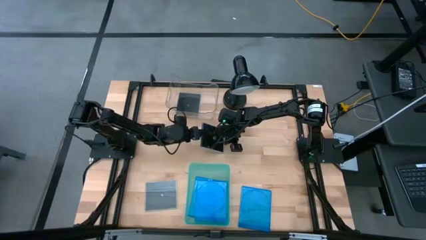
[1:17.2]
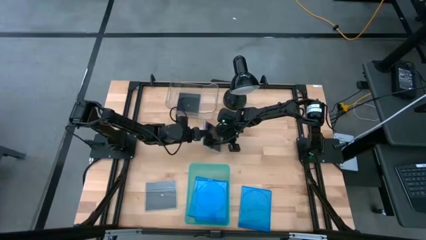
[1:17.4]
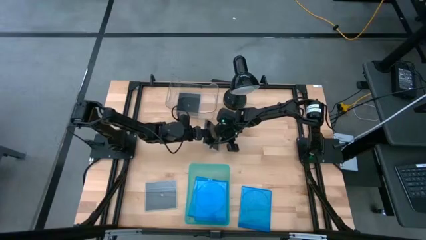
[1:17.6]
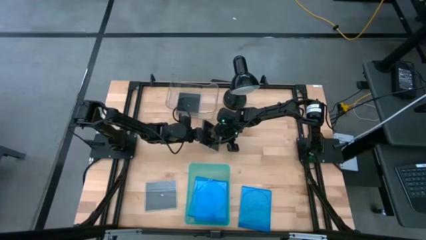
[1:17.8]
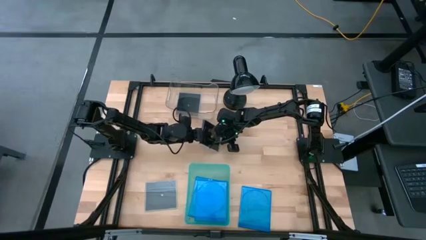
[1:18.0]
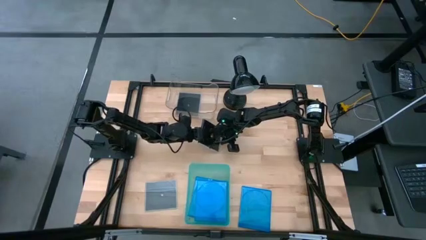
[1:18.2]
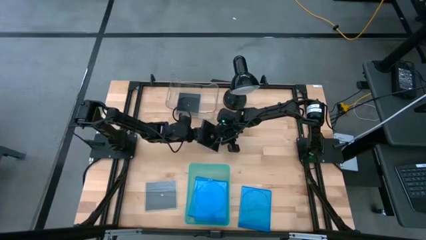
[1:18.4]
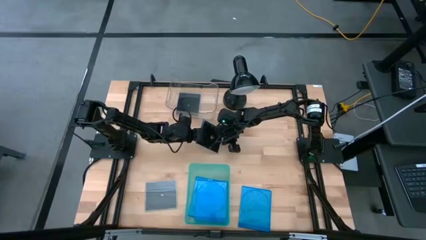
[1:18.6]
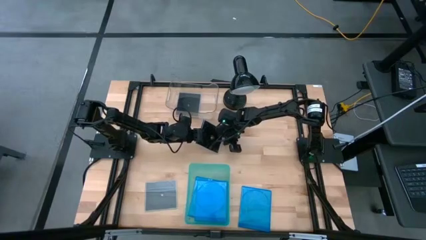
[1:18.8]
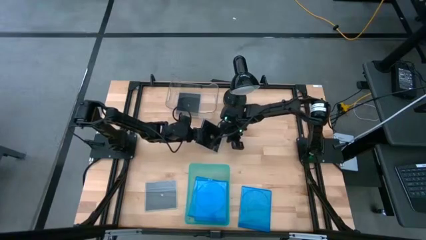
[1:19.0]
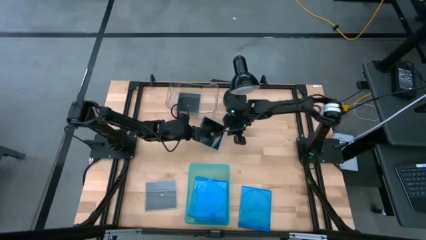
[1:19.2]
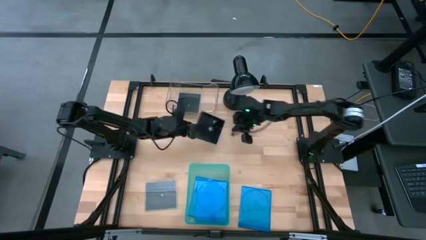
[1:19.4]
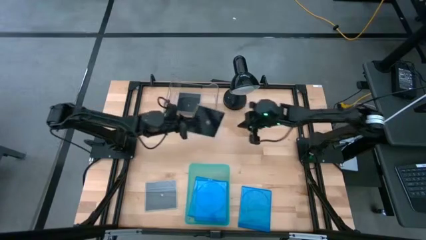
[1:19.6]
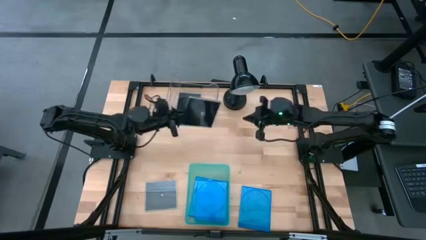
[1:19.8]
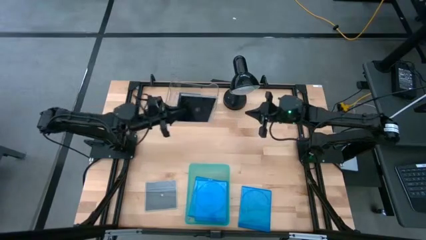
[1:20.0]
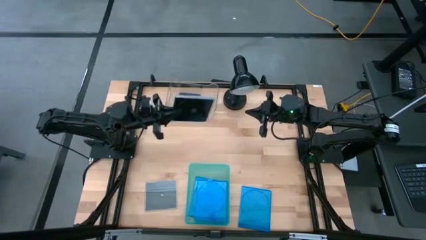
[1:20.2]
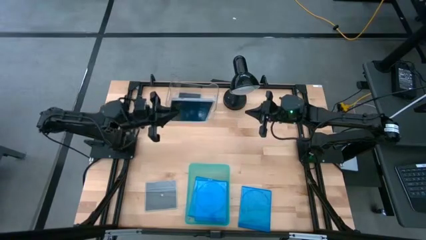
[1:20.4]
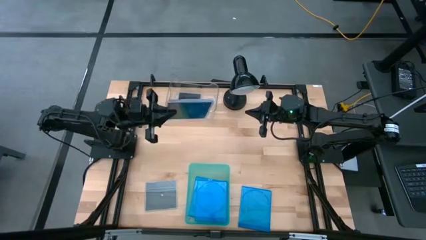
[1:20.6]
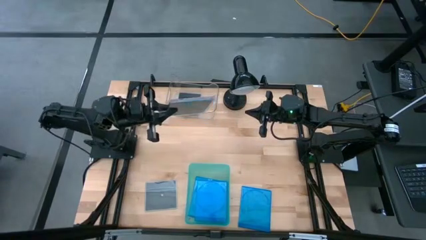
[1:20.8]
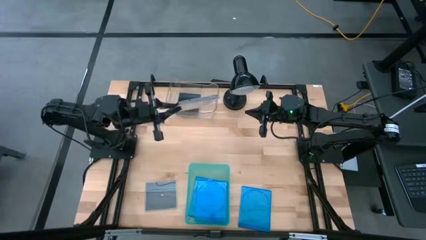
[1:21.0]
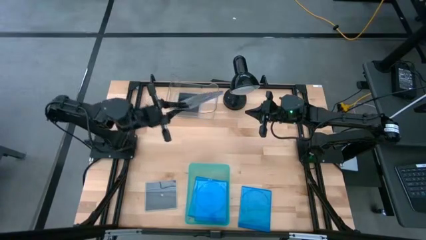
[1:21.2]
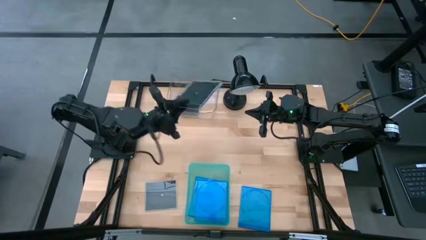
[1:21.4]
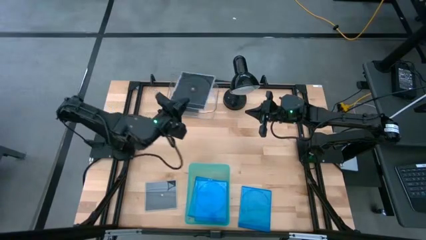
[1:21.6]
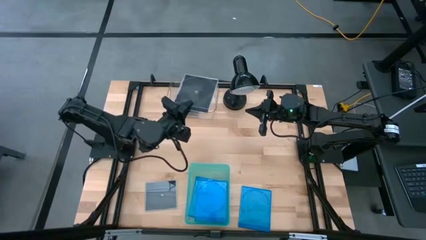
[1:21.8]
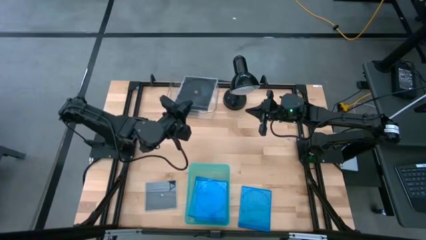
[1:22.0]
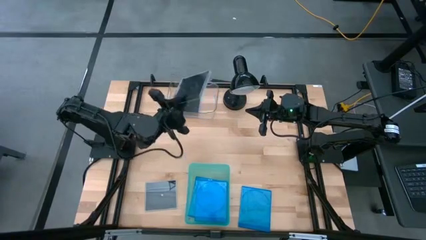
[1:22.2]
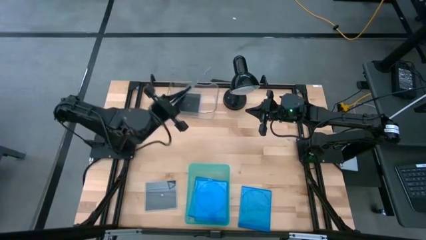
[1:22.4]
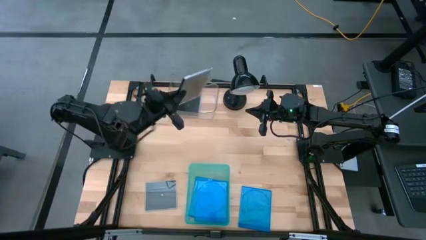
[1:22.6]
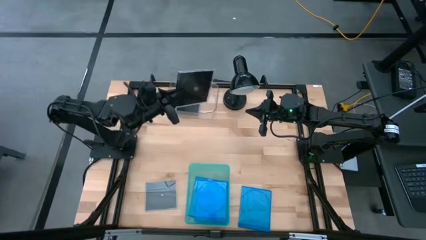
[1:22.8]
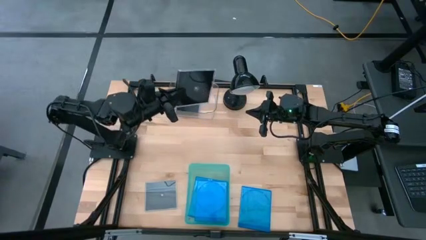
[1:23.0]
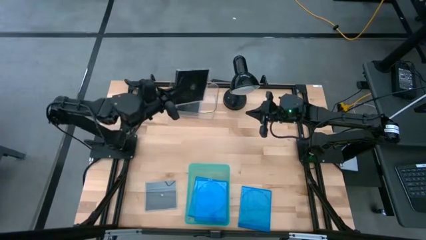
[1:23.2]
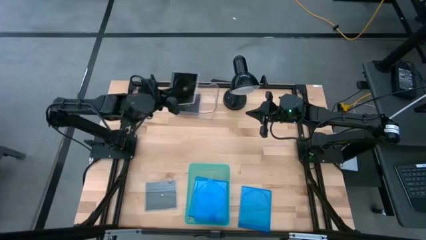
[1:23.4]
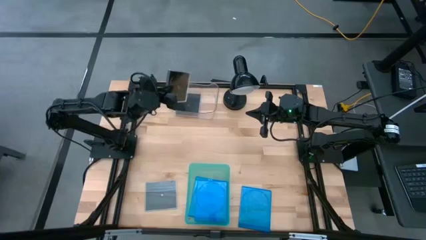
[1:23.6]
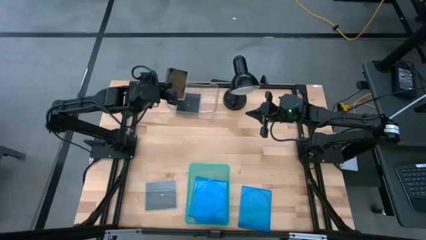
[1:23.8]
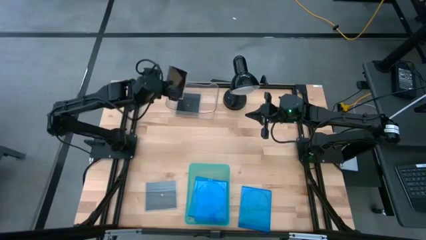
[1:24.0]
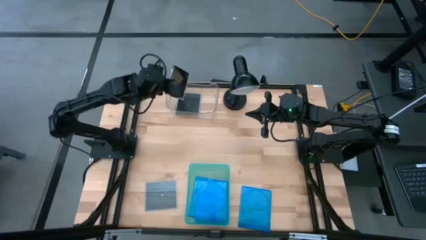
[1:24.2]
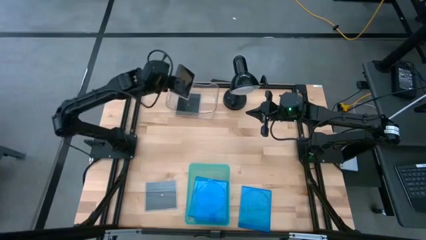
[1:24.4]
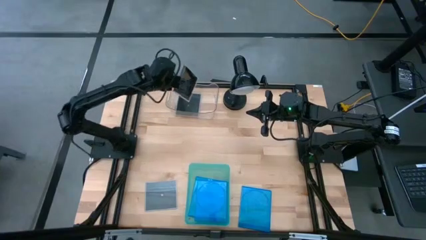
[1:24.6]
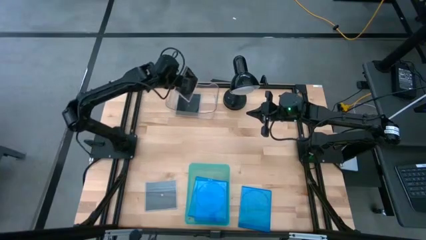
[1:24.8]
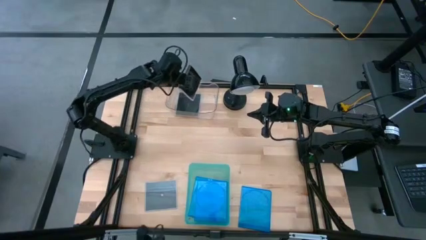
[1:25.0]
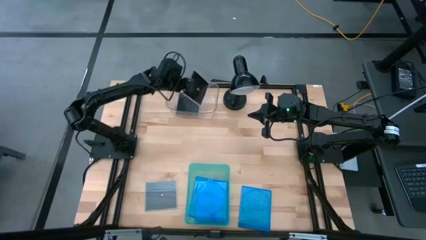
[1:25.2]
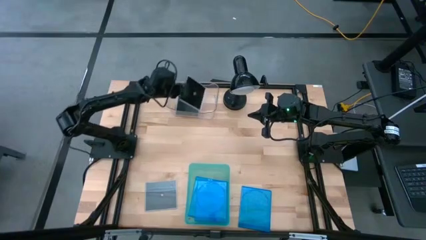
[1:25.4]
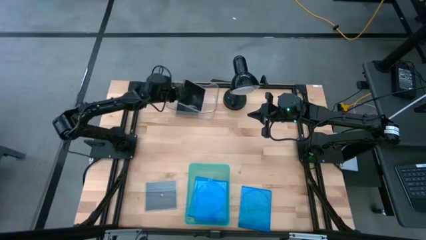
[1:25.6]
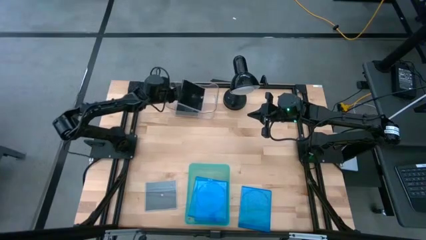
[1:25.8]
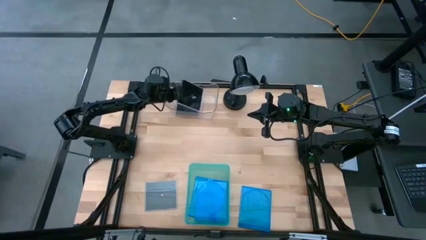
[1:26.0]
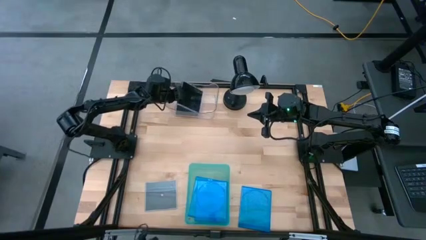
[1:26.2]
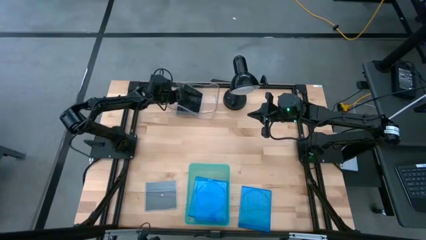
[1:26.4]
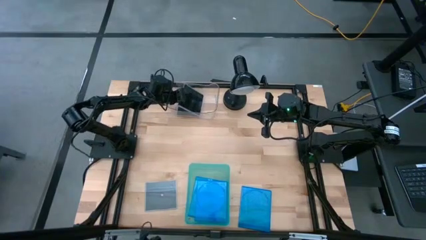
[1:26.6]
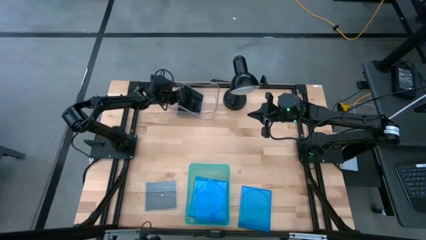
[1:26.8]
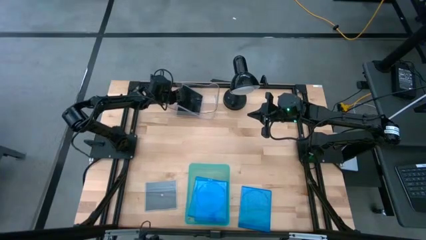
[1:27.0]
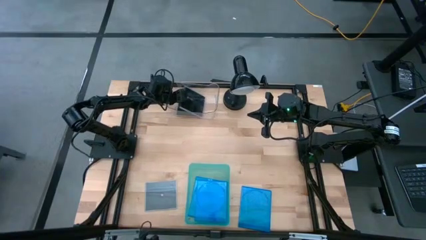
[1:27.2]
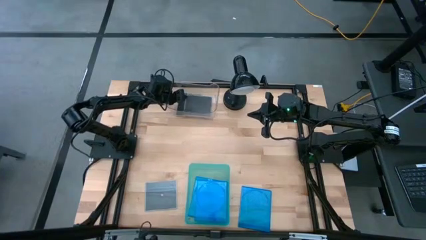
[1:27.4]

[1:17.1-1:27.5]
Task: Pick & place jewel cases by type
Put the top black CD case into the transparent bin
